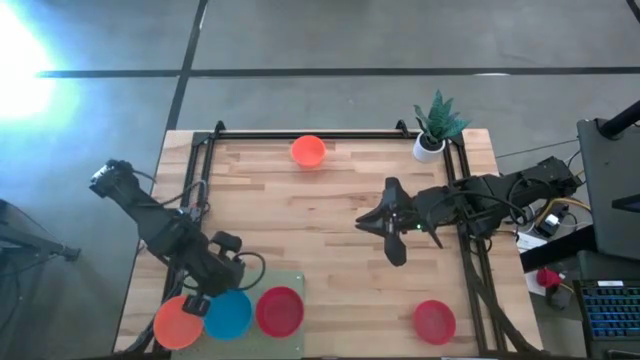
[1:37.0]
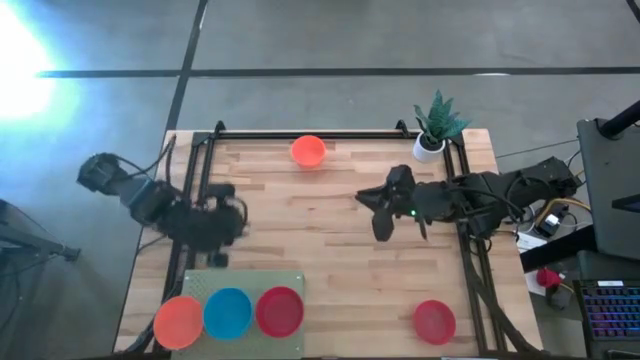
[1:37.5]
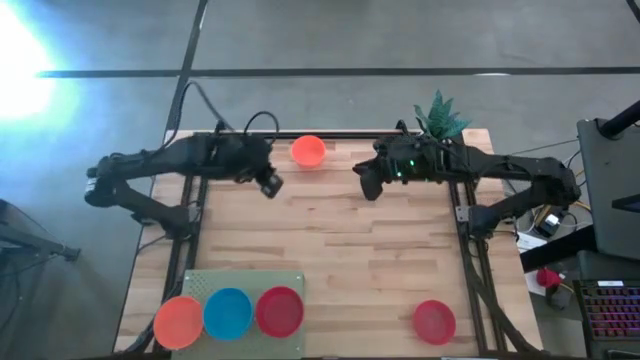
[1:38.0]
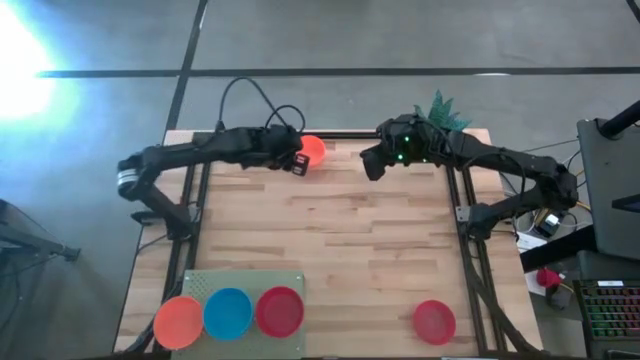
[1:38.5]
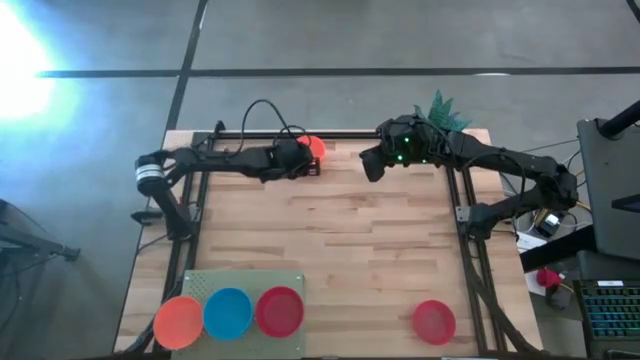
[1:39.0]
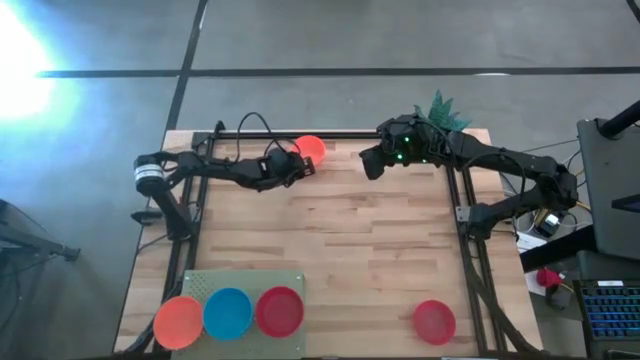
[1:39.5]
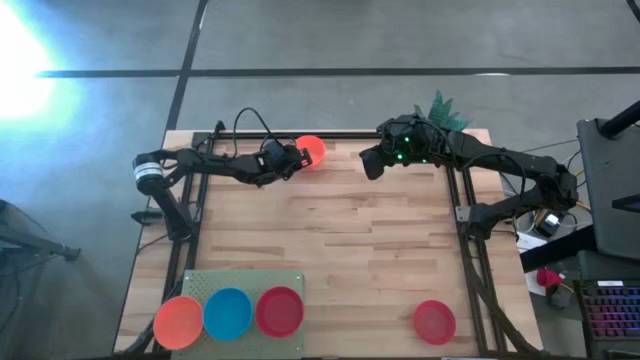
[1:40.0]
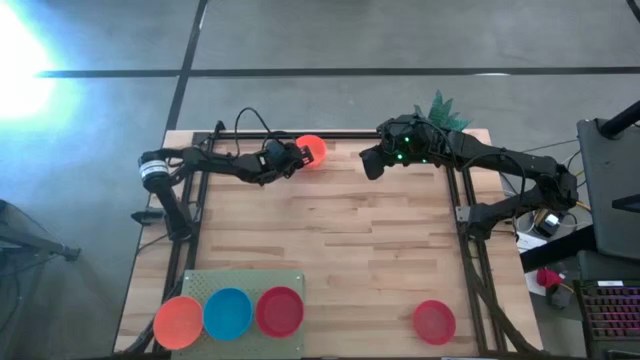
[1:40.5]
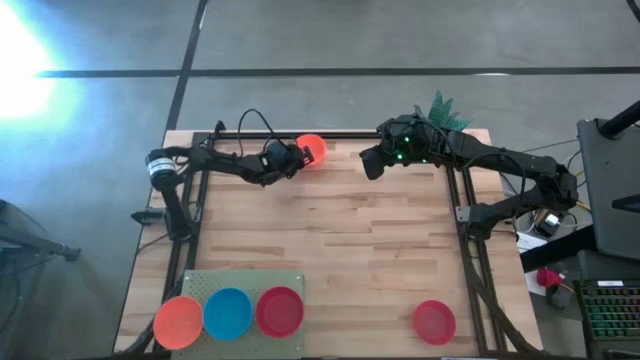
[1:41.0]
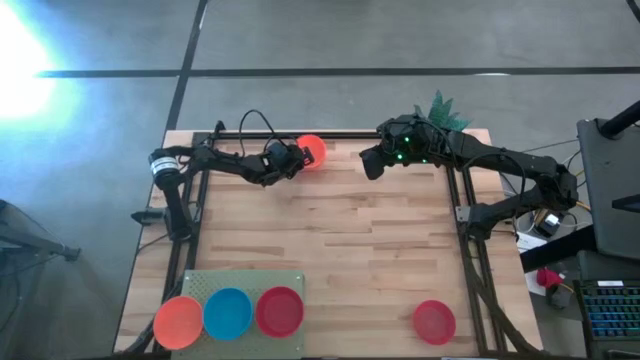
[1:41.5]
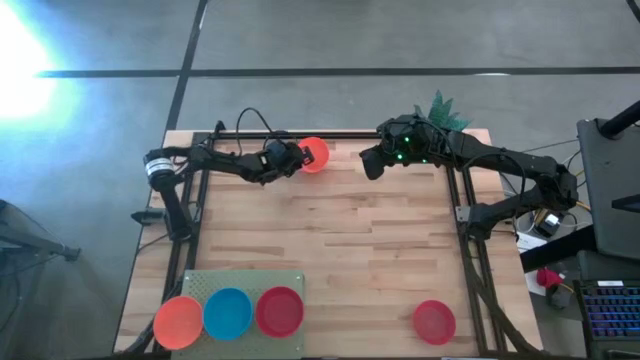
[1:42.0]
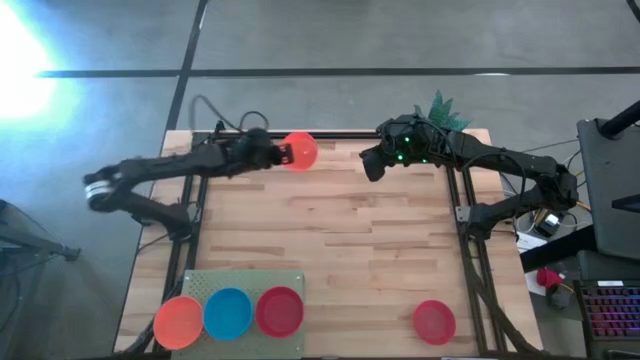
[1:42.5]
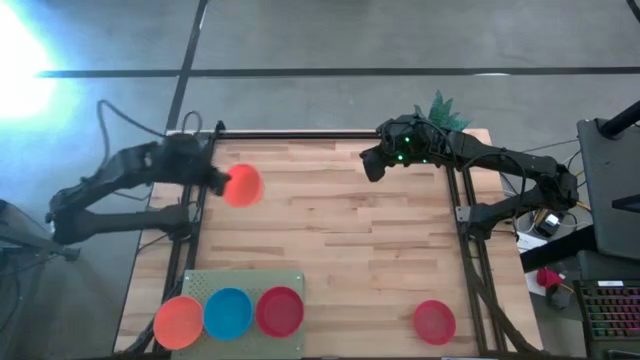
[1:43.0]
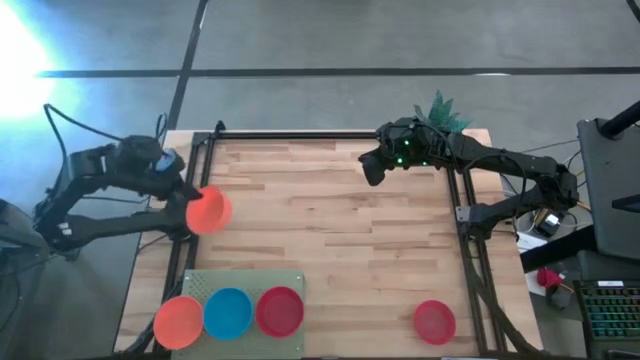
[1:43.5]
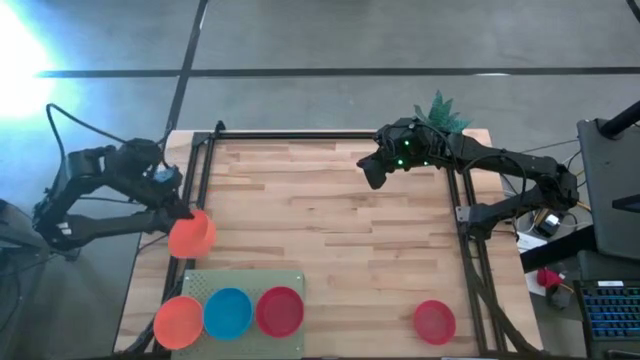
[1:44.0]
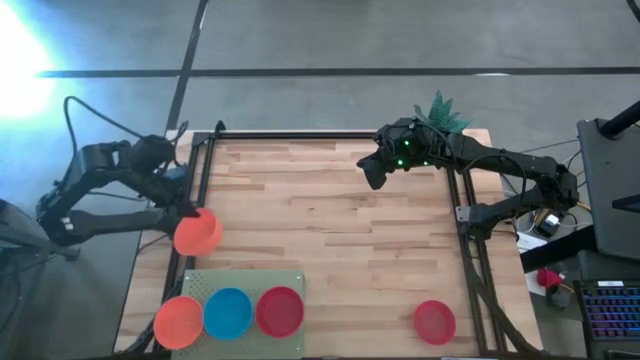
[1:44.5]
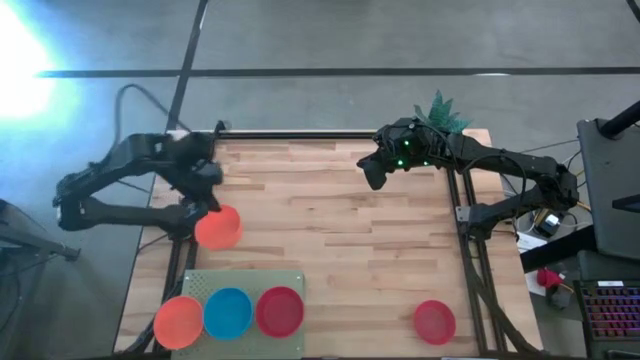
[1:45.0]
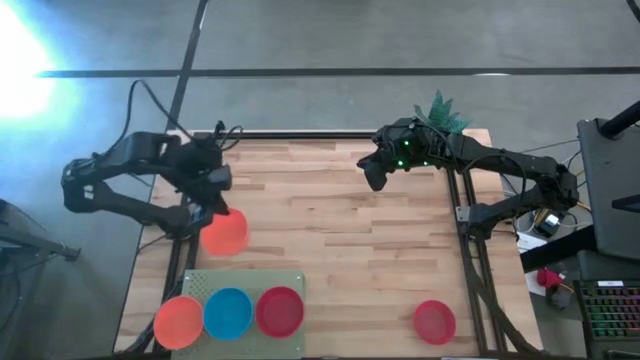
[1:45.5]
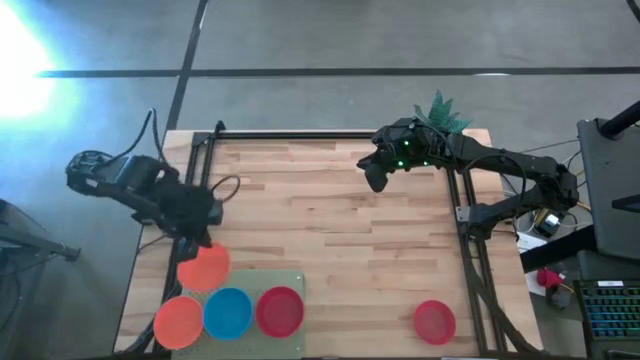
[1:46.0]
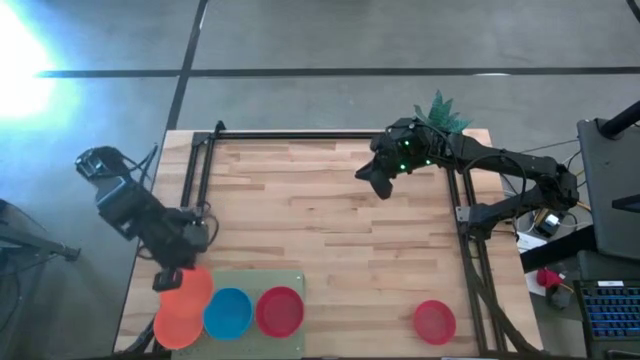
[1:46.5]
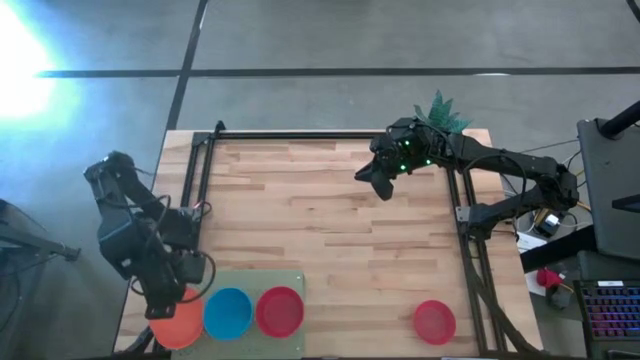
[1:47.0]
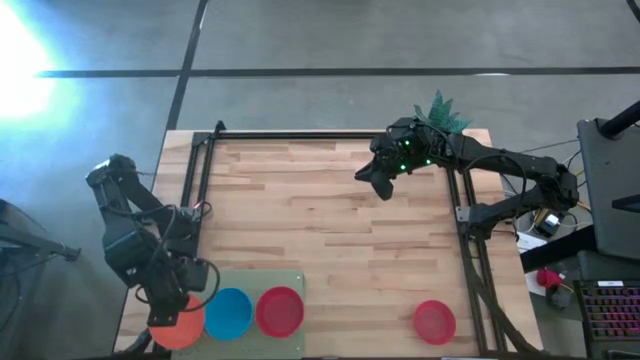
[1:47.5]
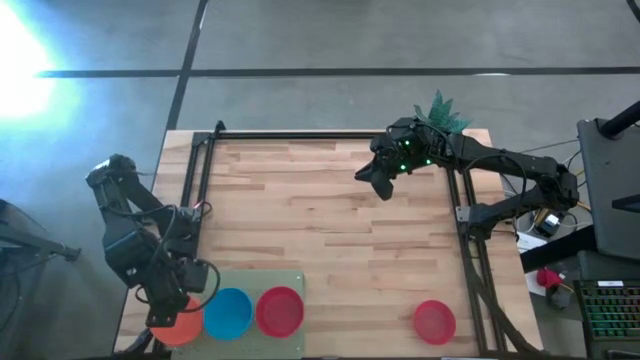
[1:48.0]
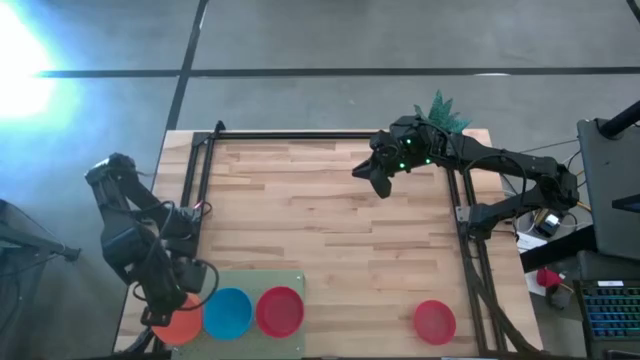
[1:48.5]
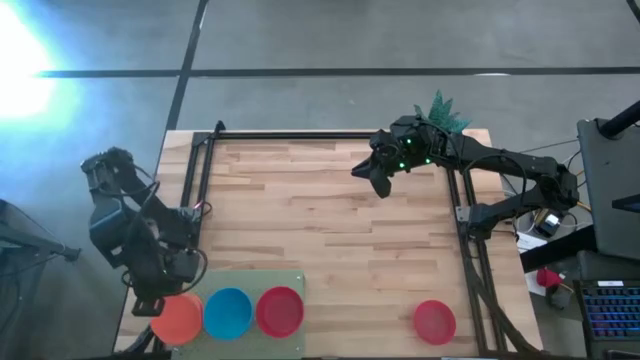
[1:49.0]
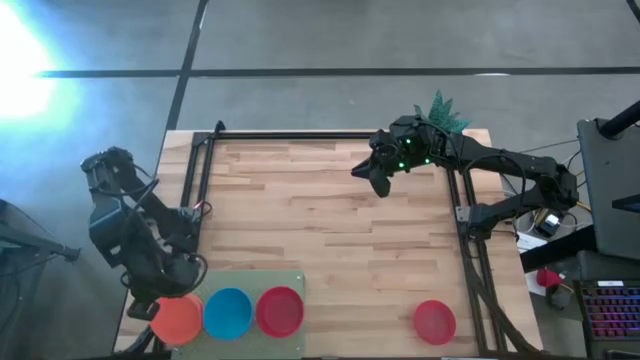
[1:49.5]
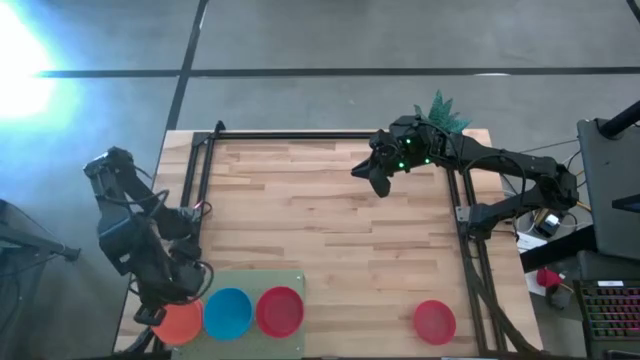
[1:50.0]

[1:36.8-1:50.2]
Task: Pick & Place Mini bowls
Stack the orange bowl on the orange bowls on the shelf

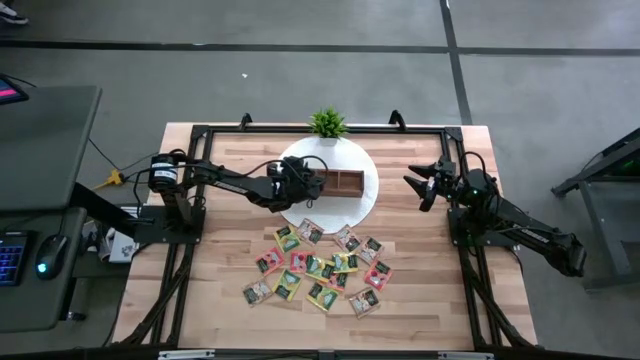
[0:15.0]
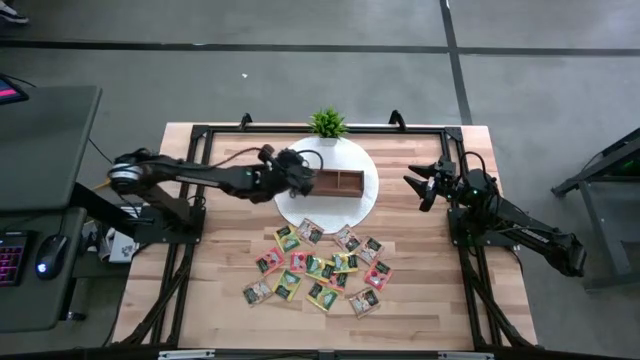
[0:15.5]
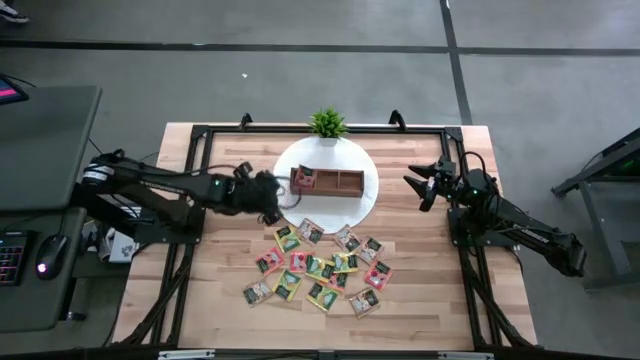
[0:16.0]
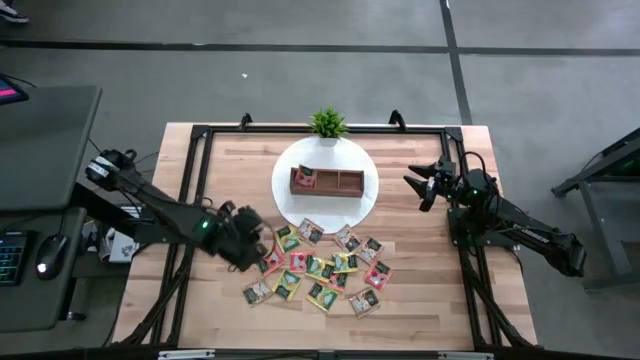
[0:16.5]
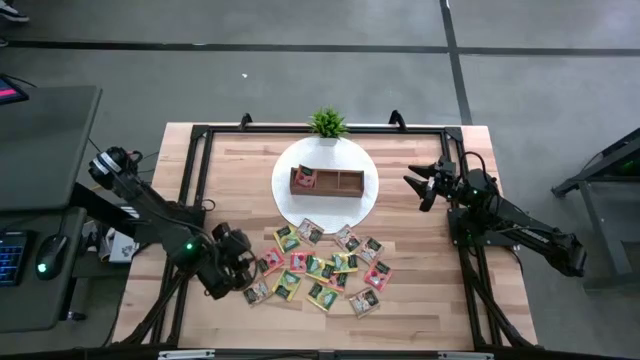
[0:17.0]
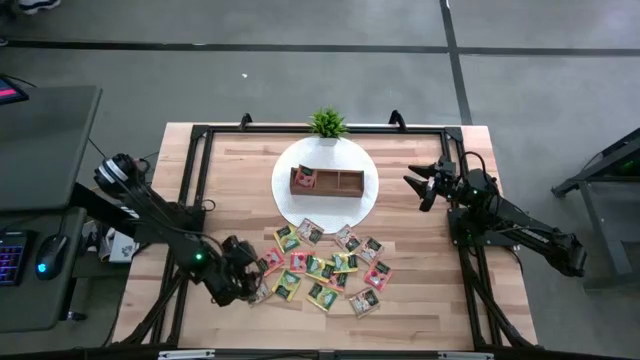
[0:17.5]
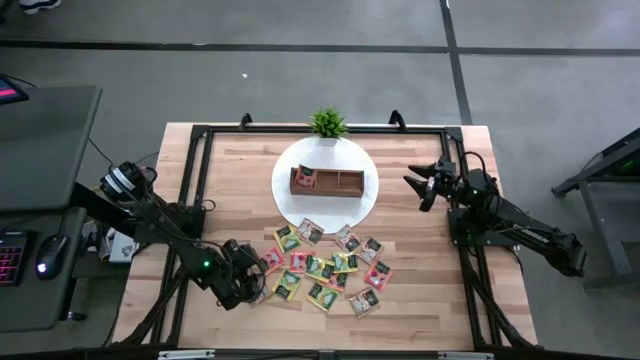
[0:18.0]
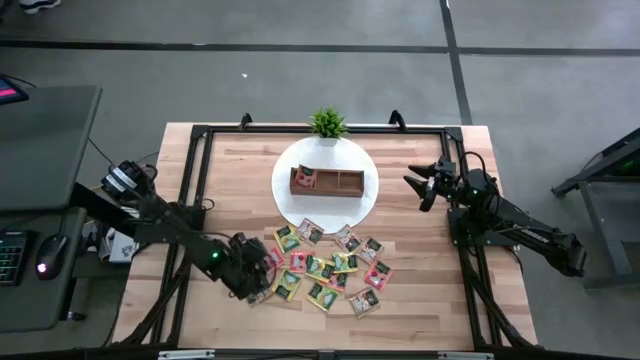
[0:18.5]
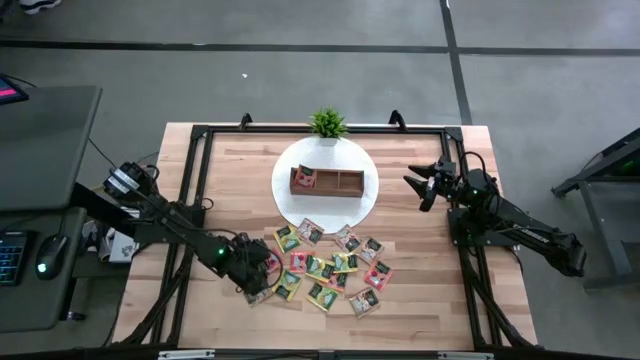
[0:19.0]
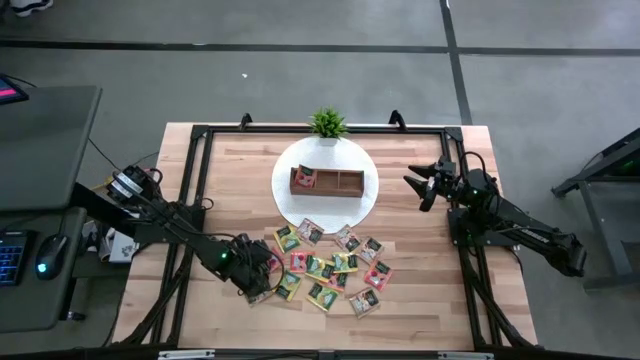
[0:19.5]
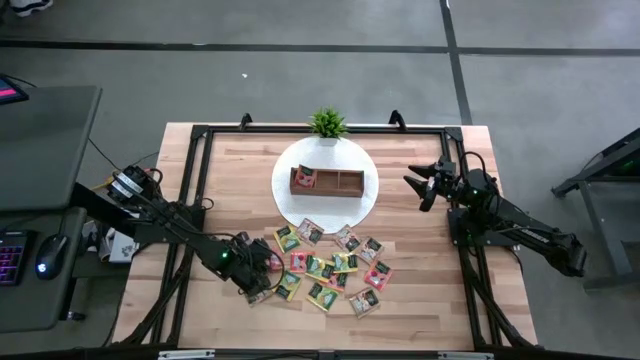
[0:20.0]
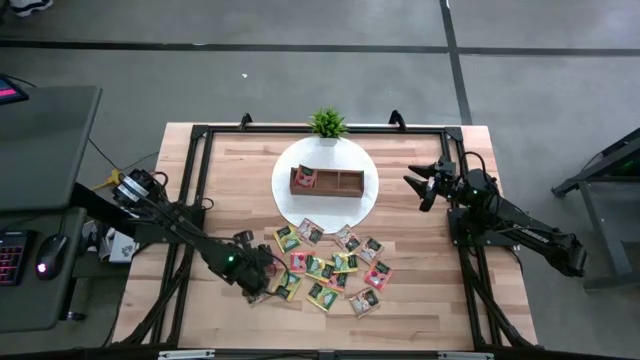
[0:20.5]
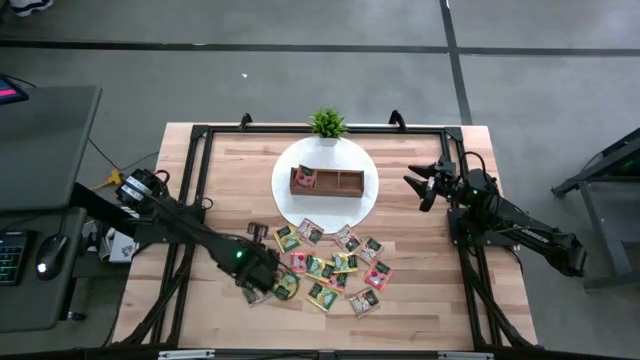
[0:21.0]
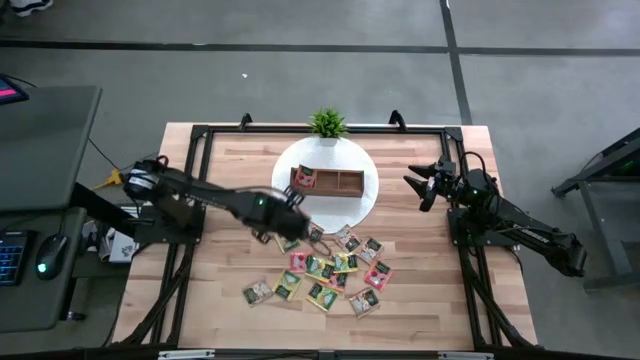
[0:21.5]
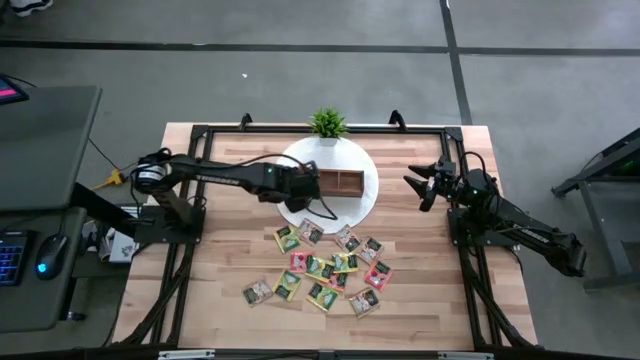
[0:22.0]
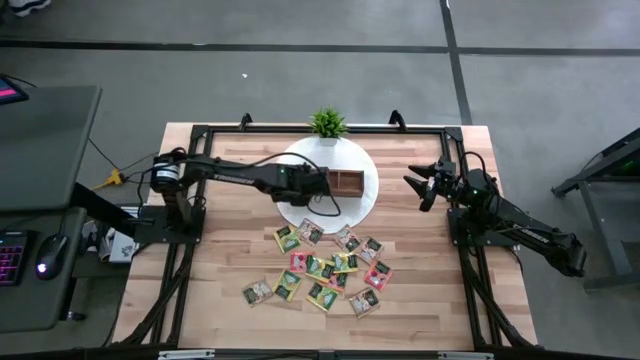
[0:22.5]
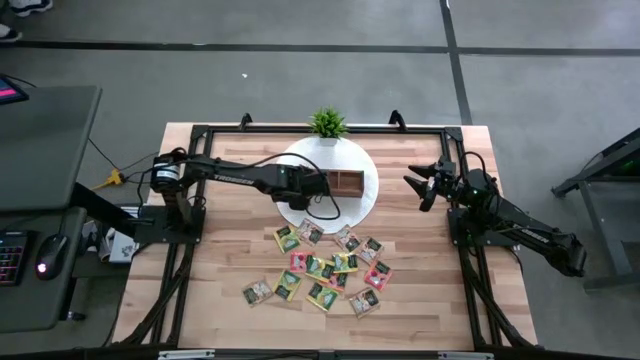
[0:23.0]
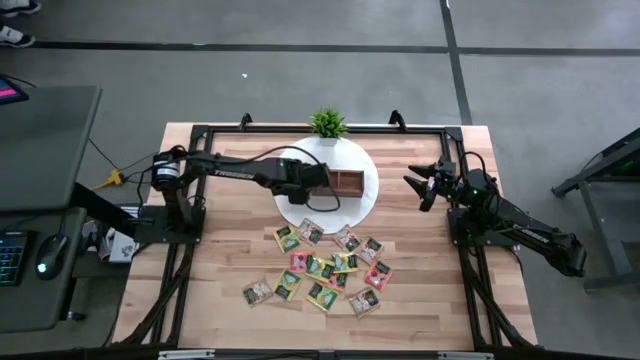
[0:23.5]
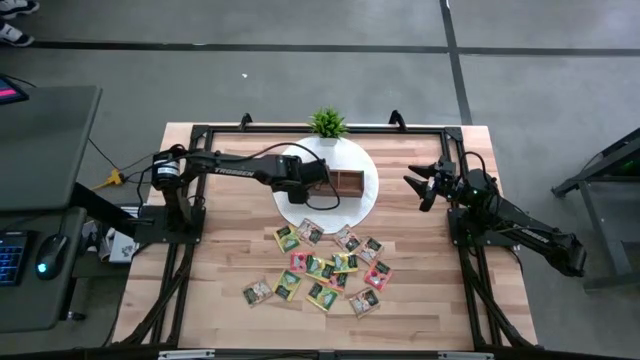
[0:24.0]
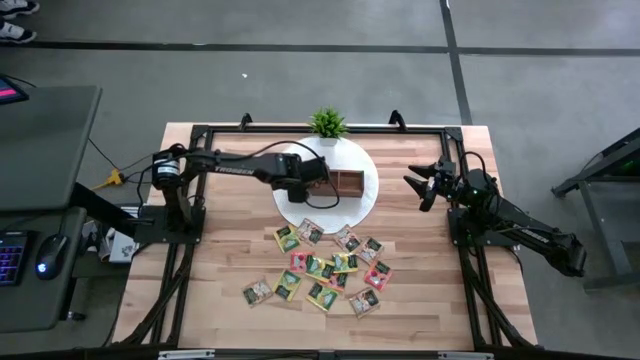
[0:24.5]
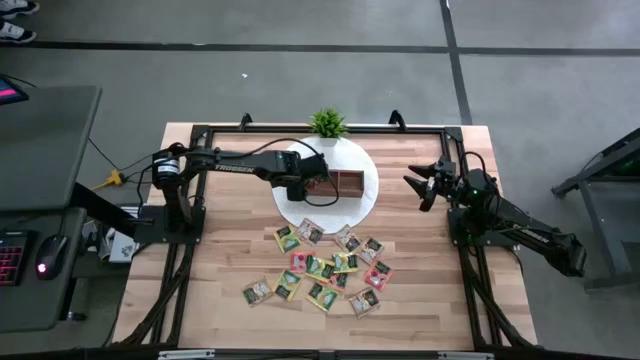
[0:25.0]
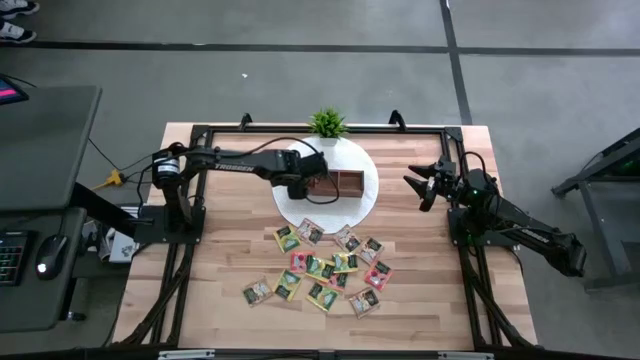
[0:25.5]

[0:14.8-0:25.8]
Task: Pick & Place Tea
Put the orange tea bag into the left section of the wooden organizer
